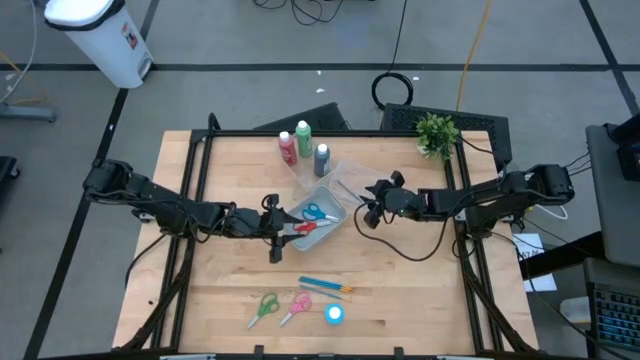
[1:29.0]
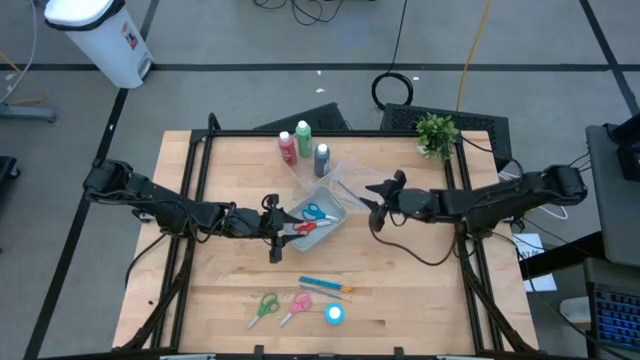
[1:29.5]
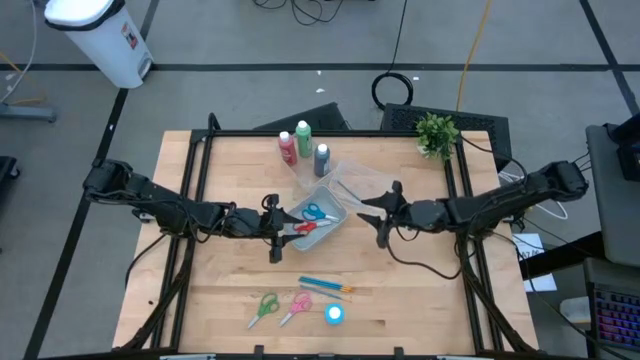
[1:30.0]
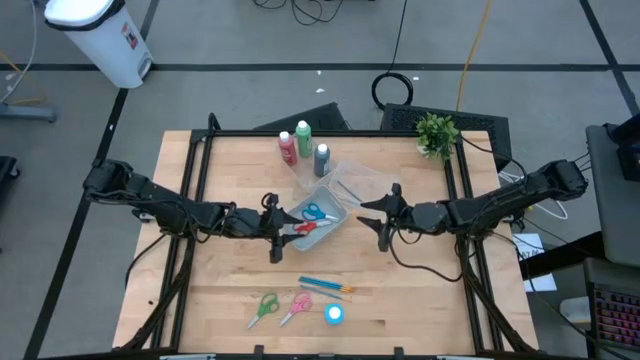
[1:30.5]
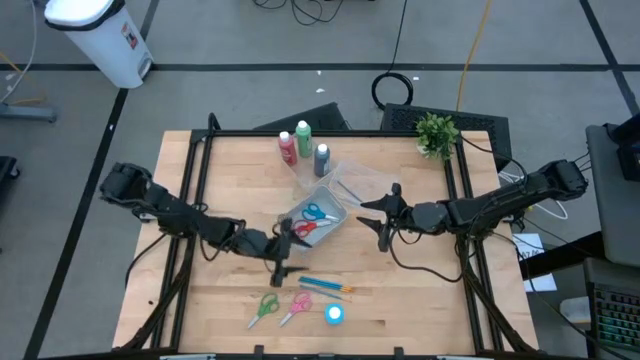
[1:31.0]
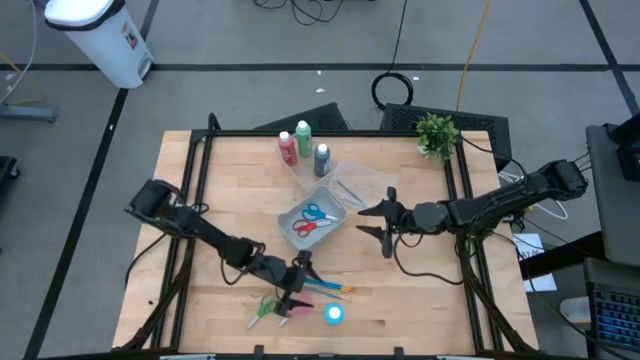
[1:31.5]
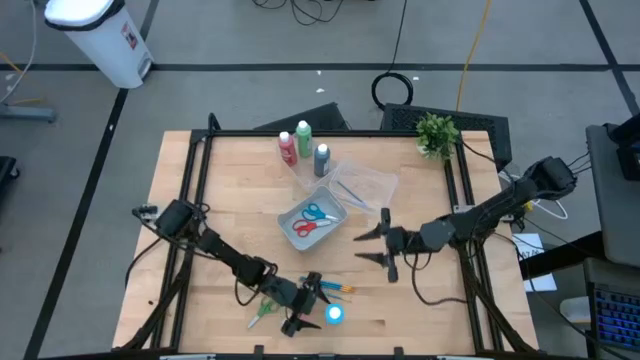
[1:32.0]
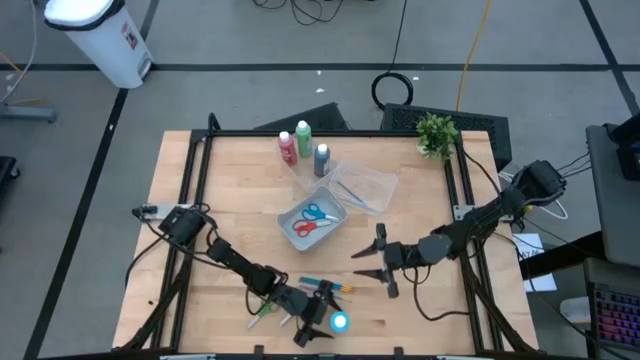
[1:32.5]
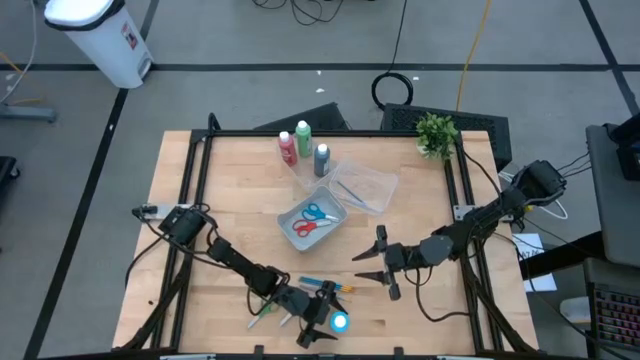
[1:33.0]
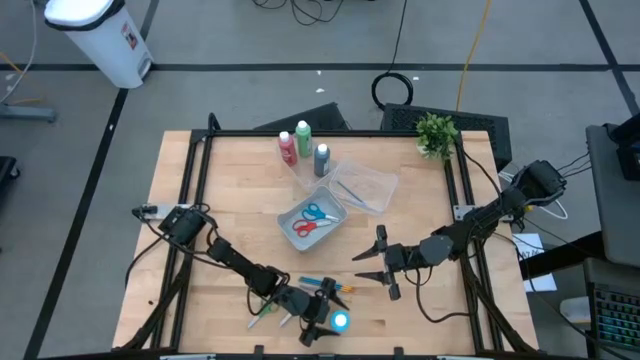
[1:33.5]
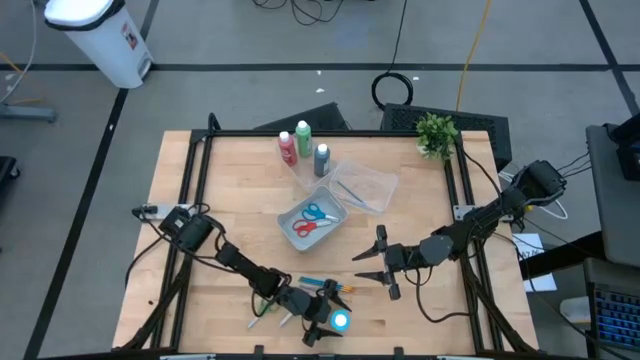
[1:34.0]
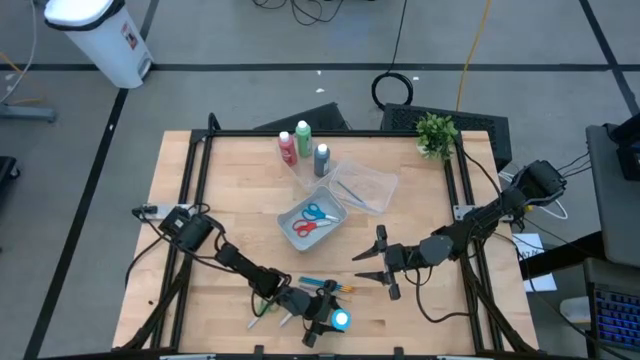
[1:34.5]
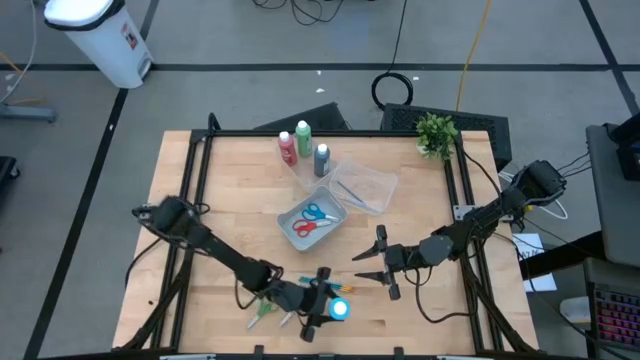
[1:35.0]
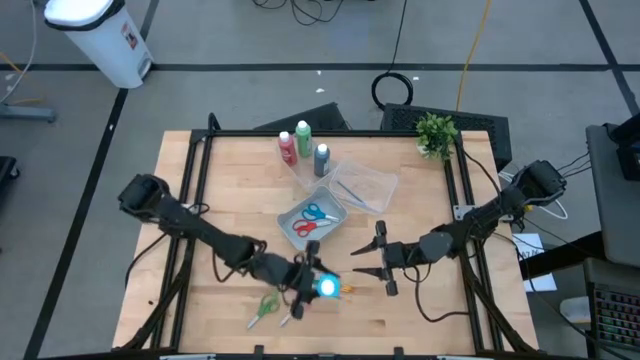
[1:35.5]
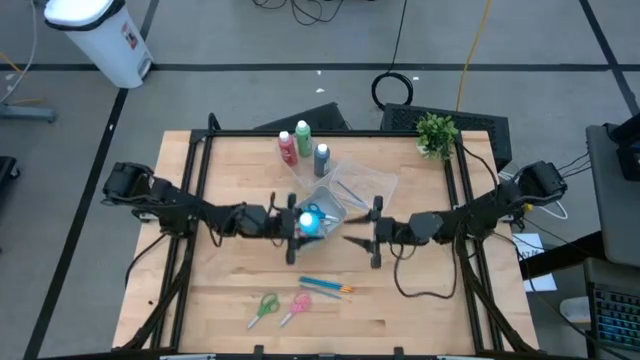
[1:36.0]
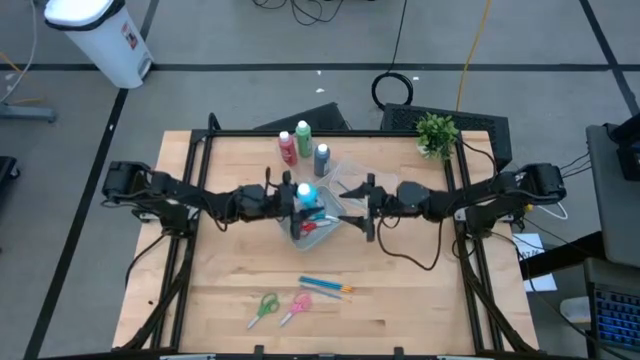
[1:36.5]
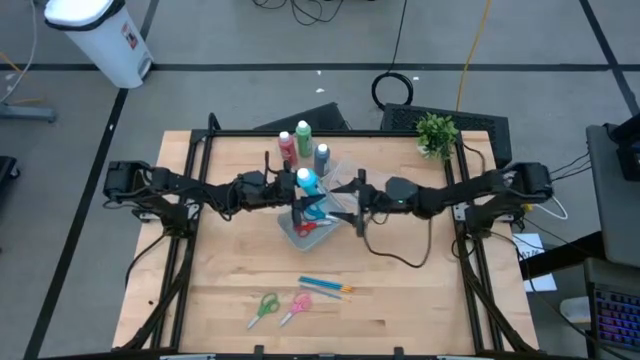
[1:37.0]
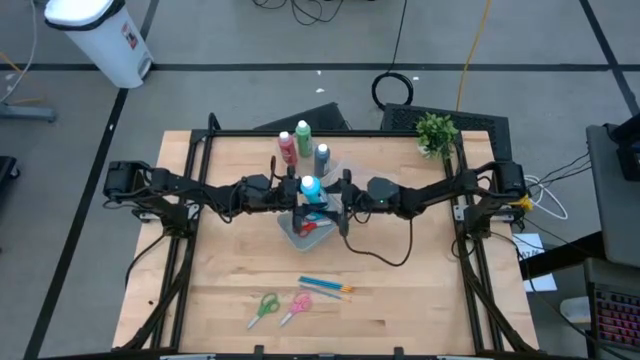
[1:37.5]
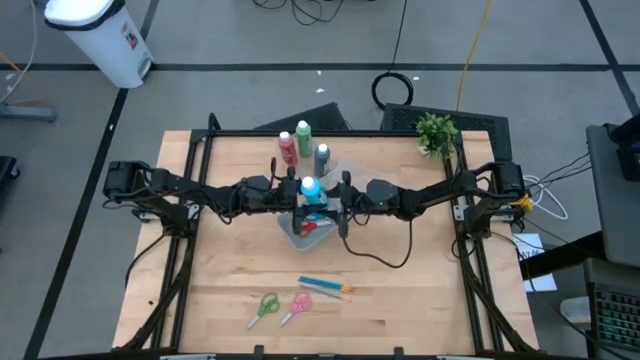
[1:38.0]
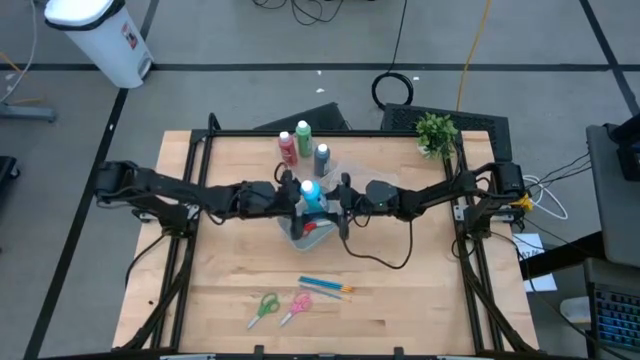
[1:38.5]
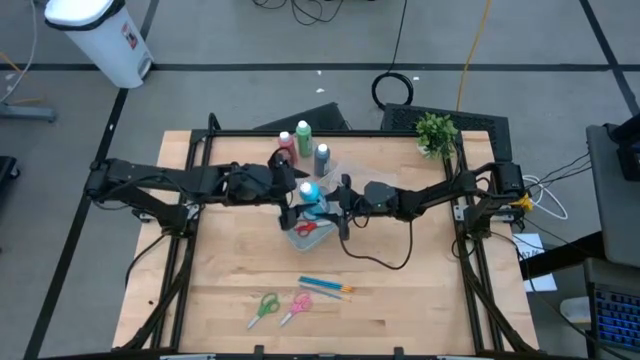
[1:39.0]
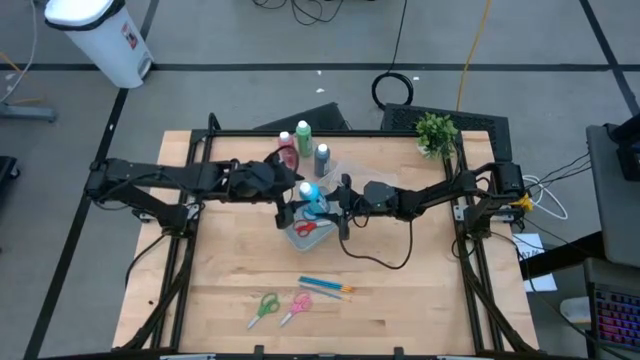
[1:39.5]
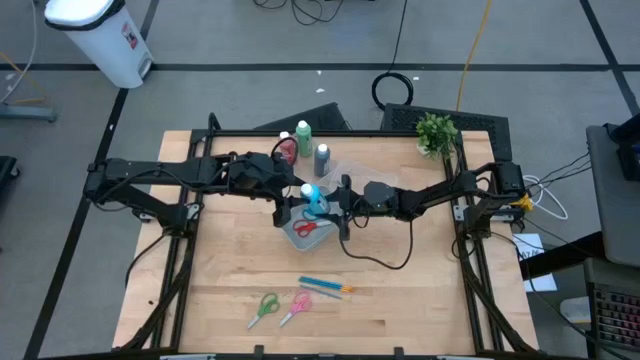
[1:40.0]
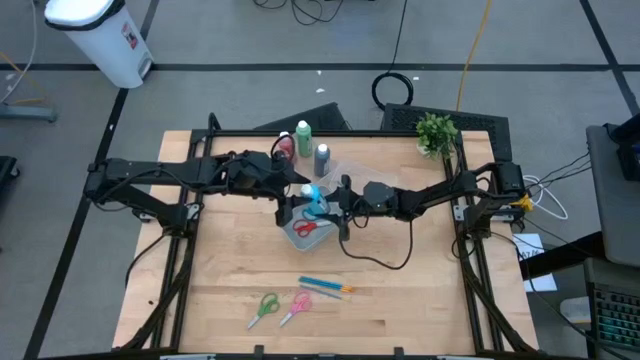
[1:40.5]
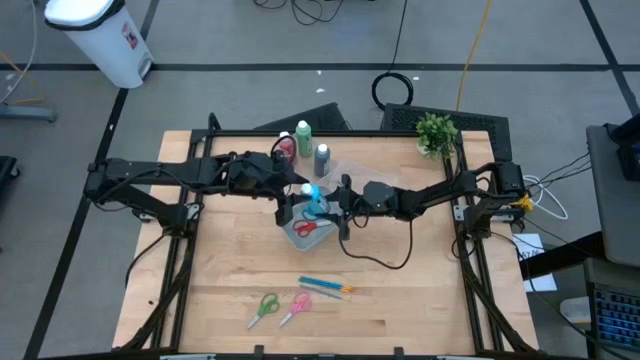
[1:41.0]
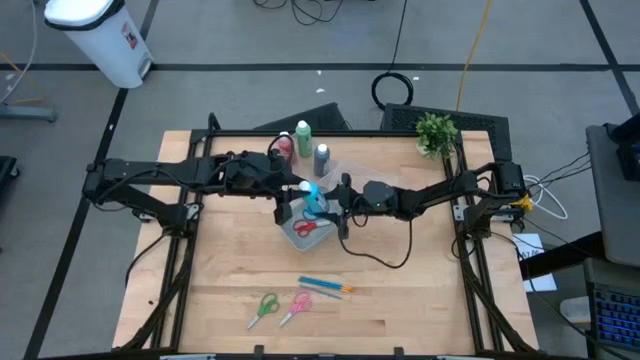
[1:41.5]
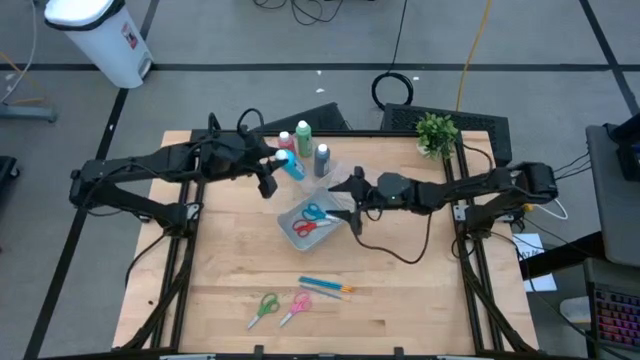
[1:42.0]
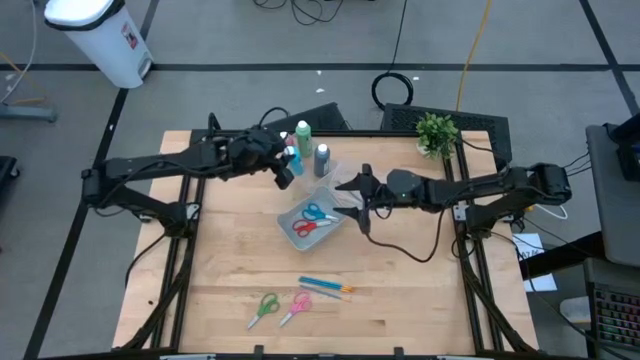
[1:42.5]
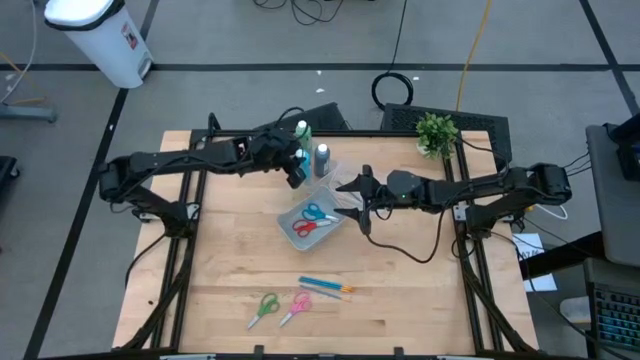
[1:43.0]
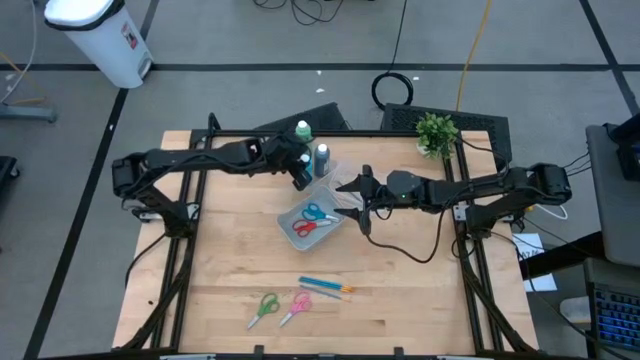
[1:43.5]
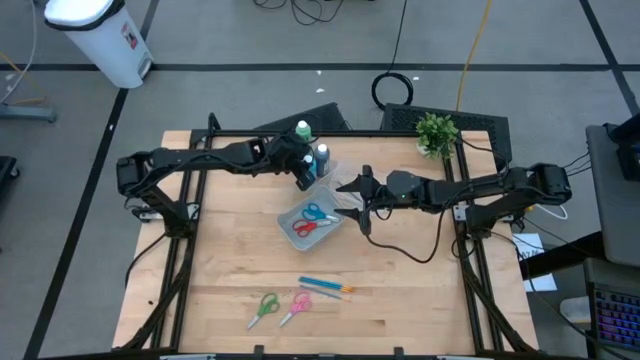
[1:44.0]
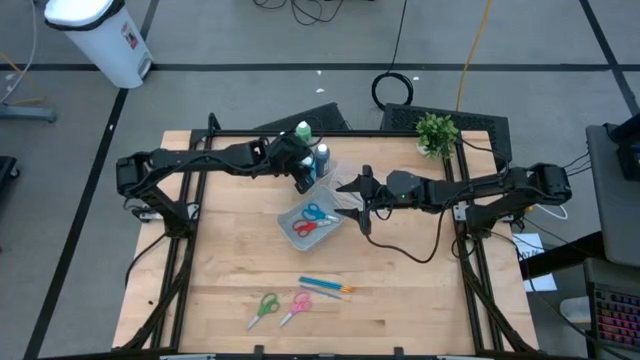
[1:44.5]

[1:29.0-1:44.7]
Task: Pick & Place Paint Supplies
Put the blue paint bottle into the left transparent bin

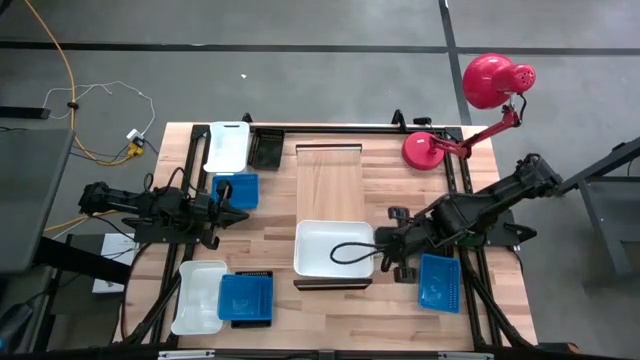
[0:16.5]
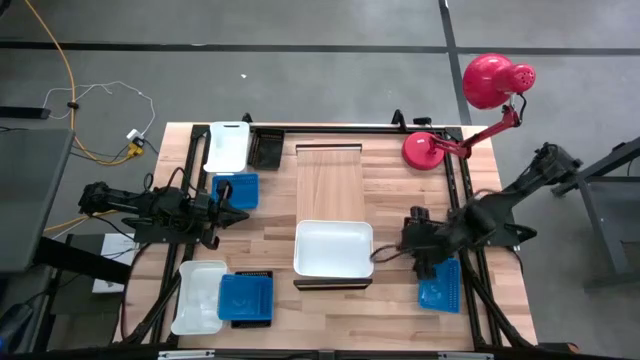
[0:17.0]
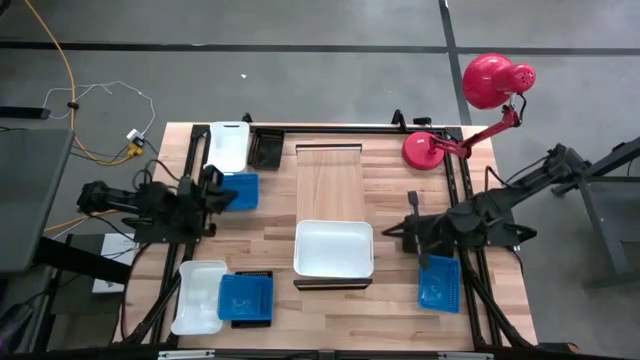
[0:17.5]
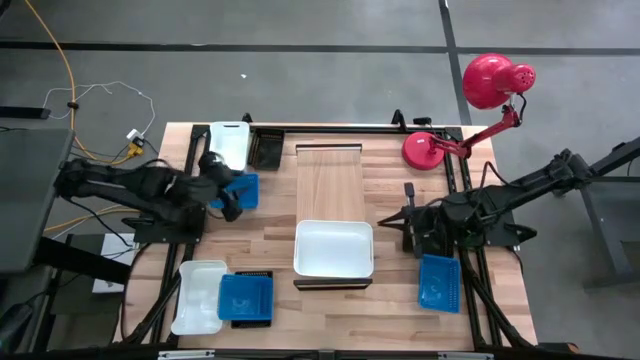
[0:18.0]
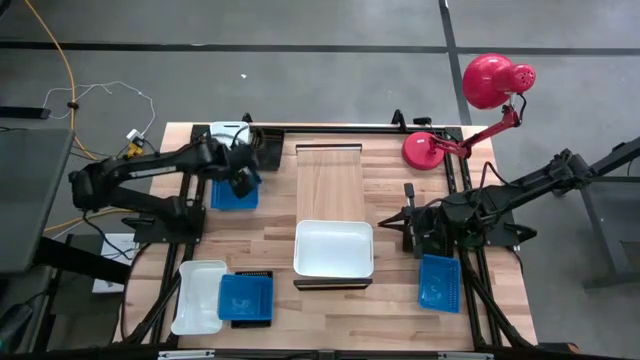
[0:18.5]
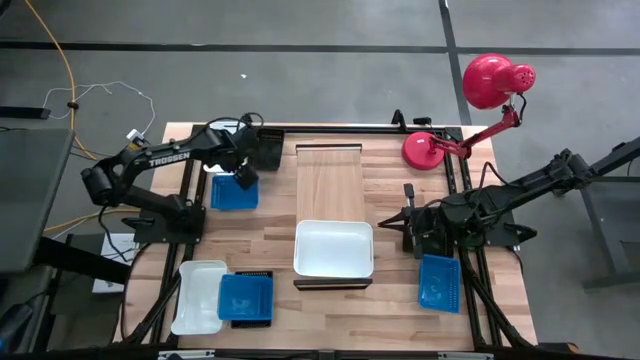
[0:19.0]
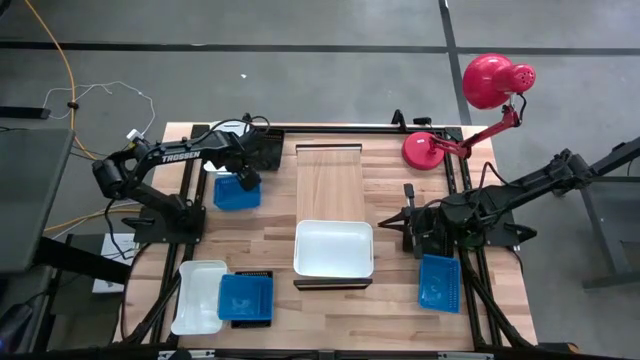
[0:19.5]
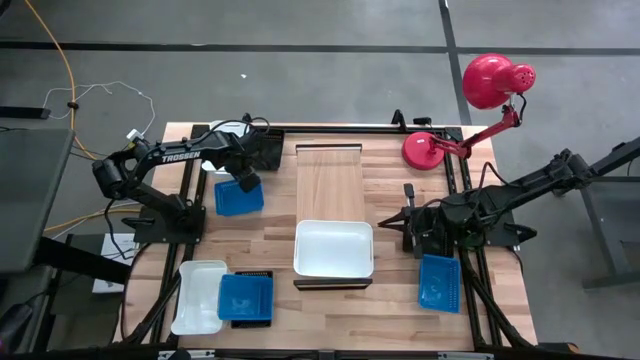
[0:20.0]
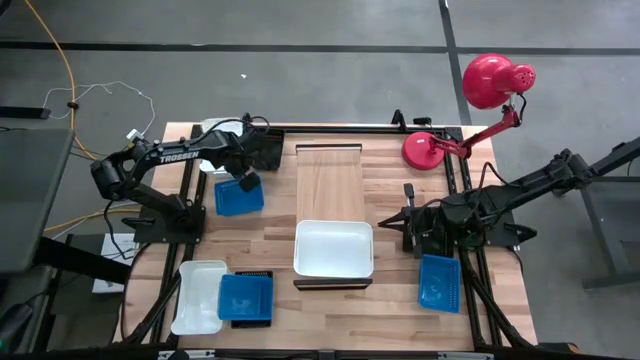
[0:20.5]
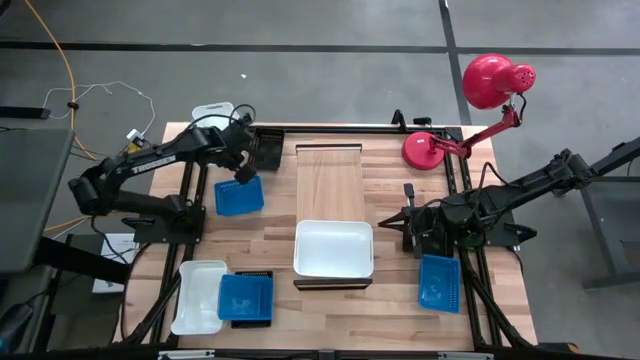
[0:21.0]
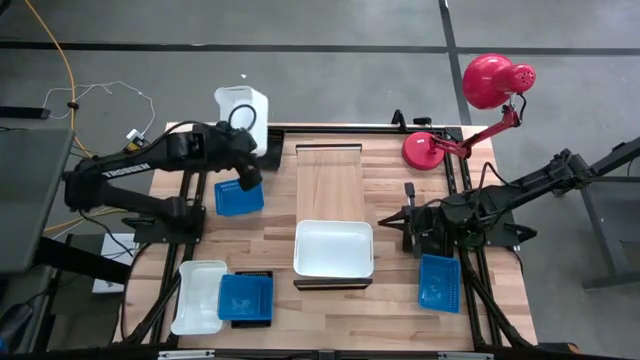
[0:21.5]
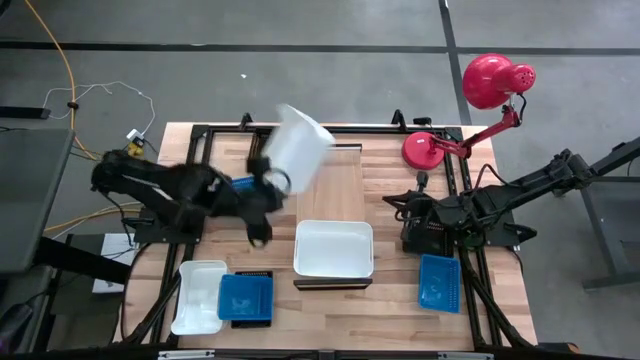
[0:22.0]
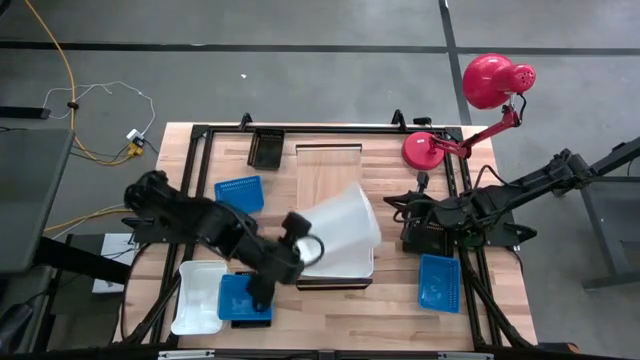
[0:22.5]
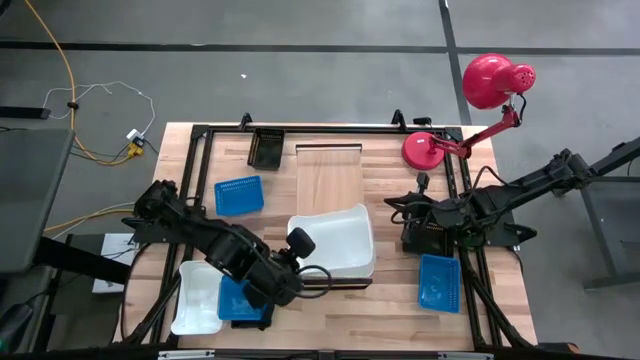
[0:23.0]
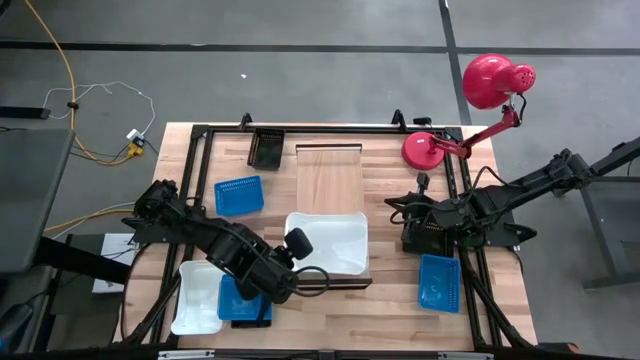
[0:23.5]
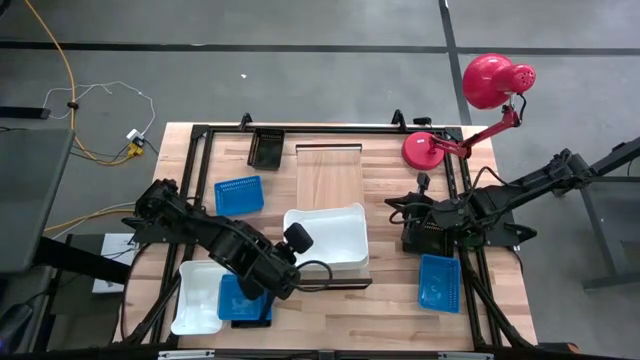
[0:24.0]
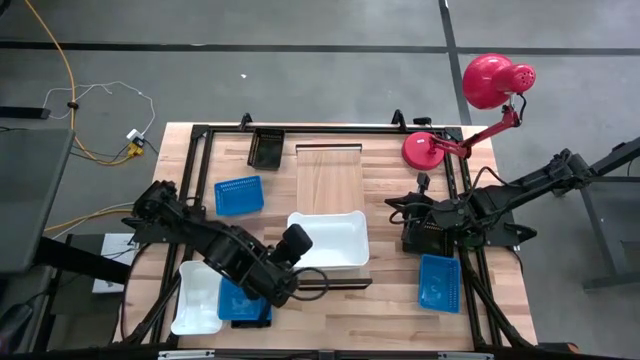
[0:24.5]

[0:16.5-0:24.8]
Task: Stack baskets on shelf by color
Stack the top white bin on the white bin on the shelf
